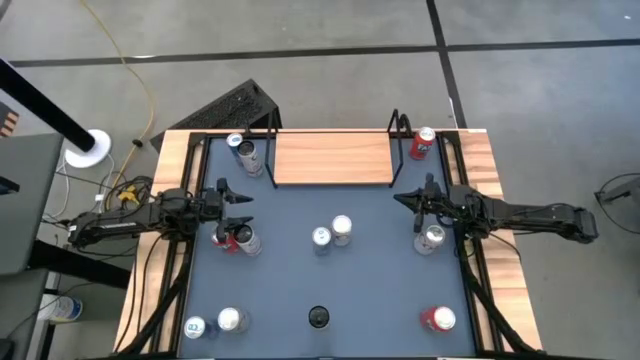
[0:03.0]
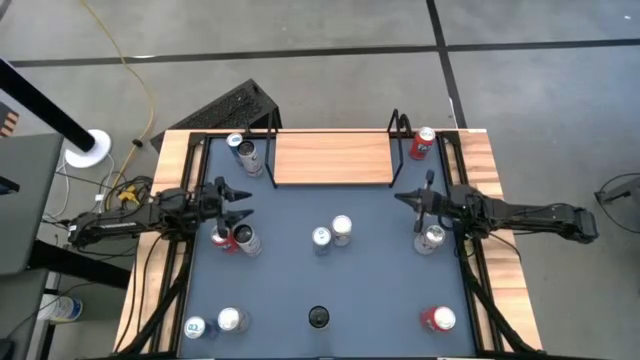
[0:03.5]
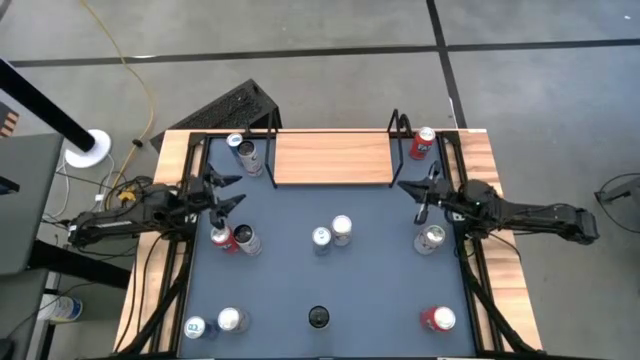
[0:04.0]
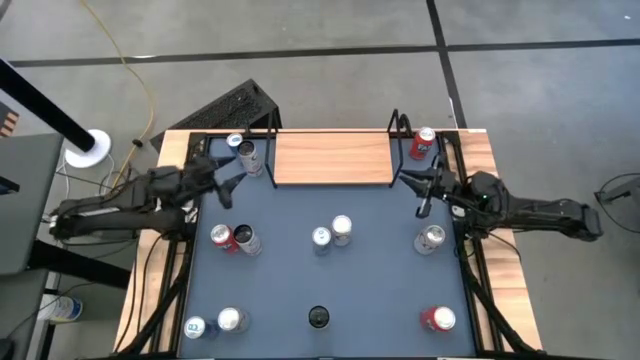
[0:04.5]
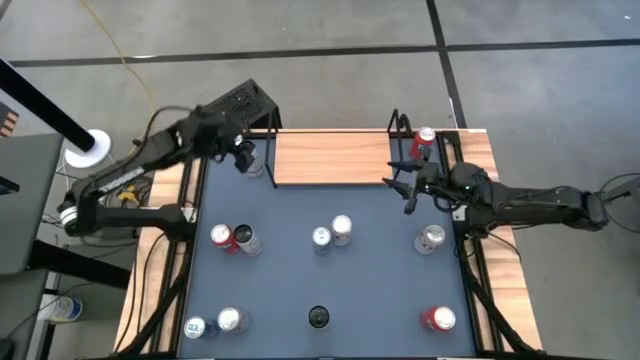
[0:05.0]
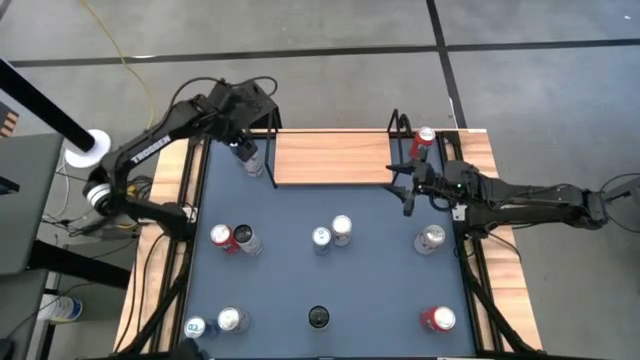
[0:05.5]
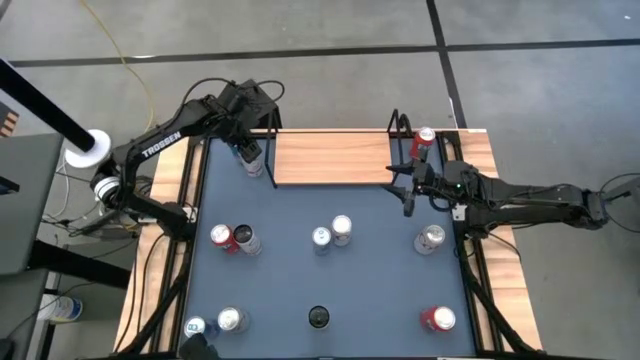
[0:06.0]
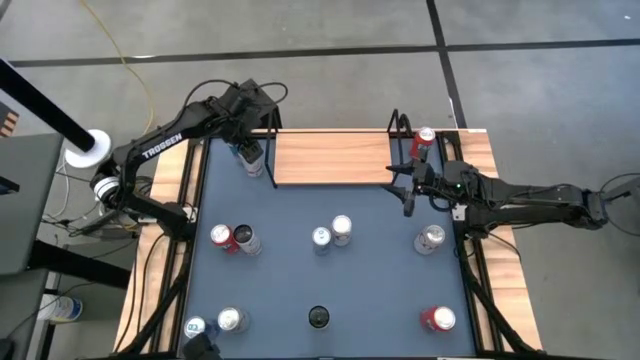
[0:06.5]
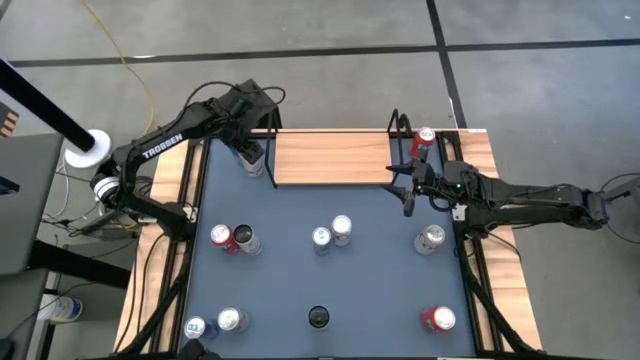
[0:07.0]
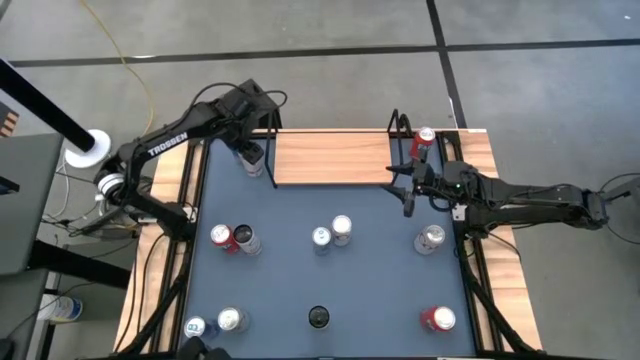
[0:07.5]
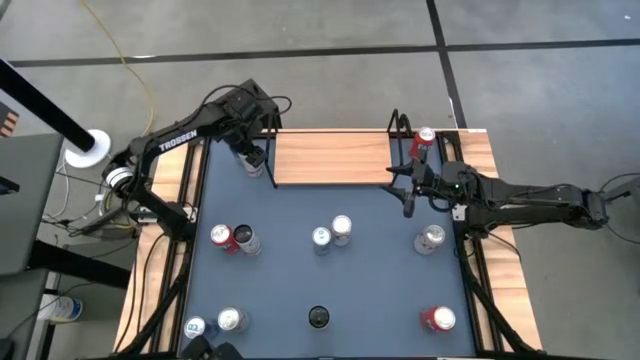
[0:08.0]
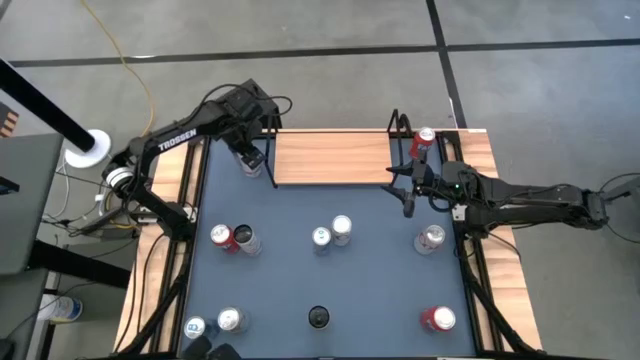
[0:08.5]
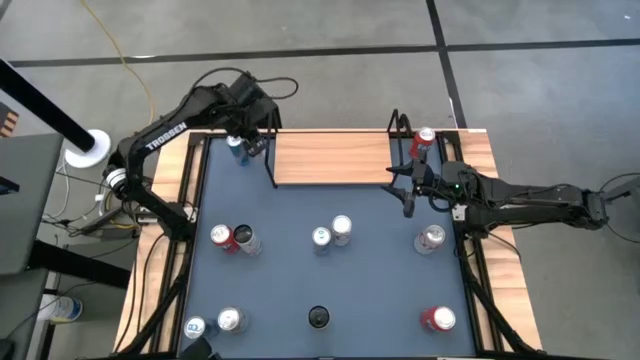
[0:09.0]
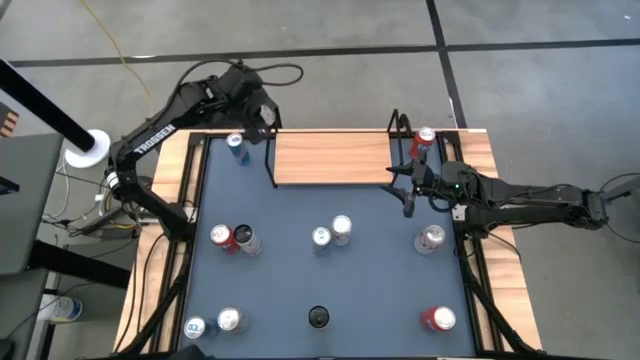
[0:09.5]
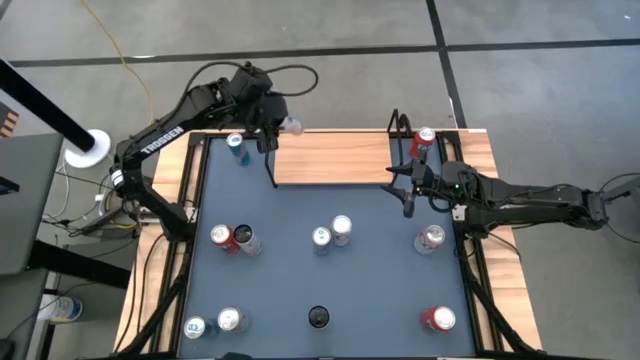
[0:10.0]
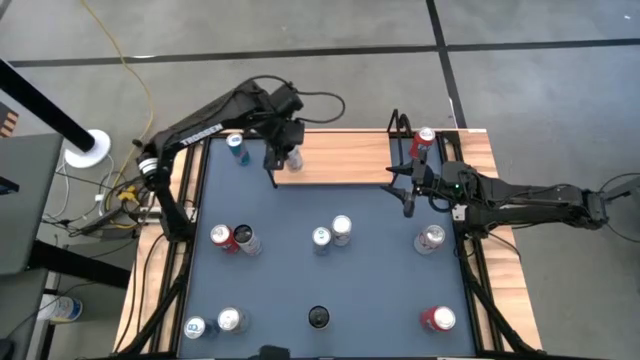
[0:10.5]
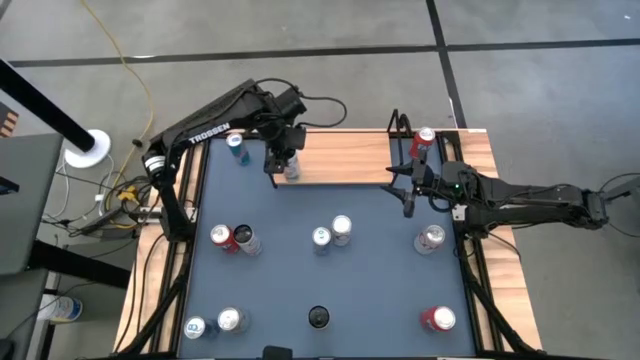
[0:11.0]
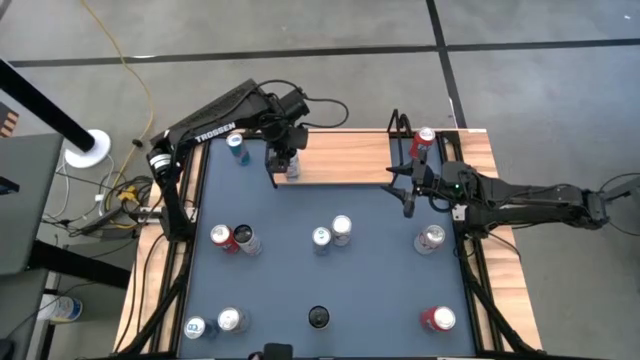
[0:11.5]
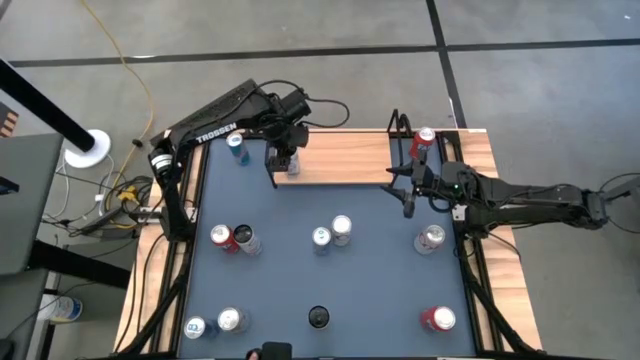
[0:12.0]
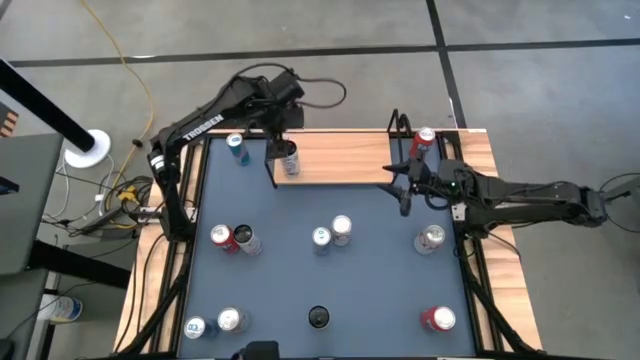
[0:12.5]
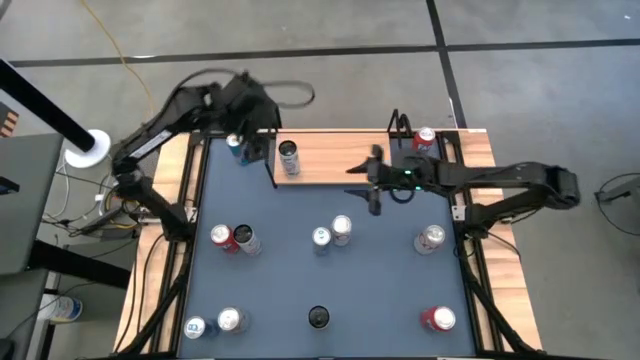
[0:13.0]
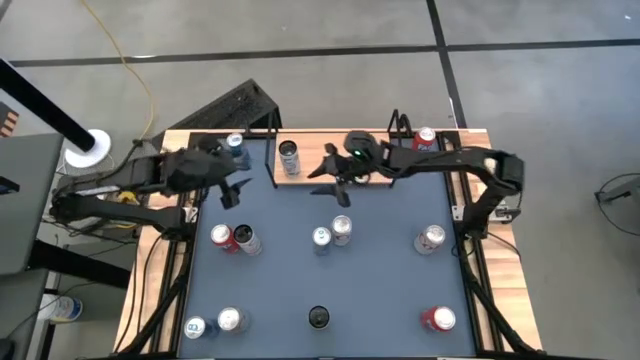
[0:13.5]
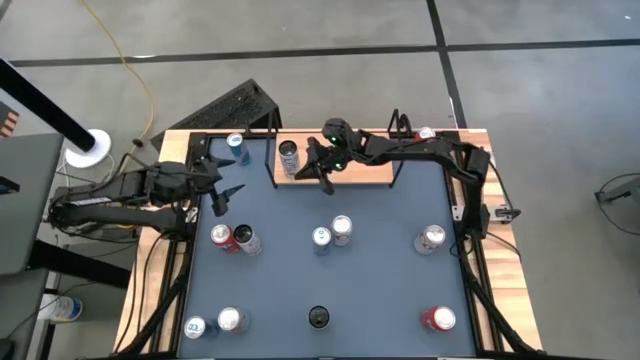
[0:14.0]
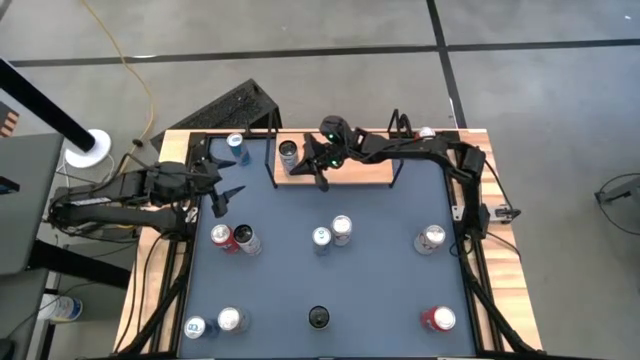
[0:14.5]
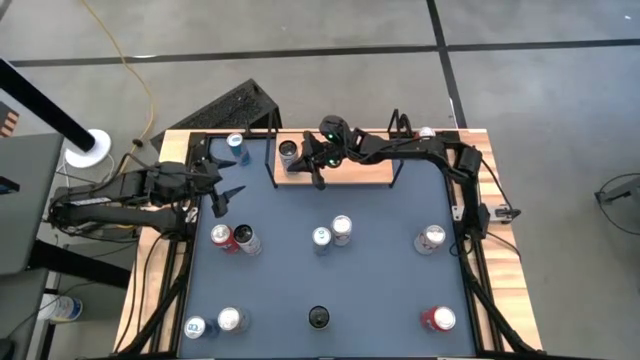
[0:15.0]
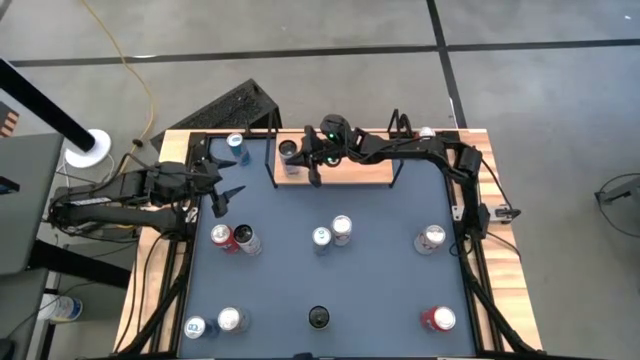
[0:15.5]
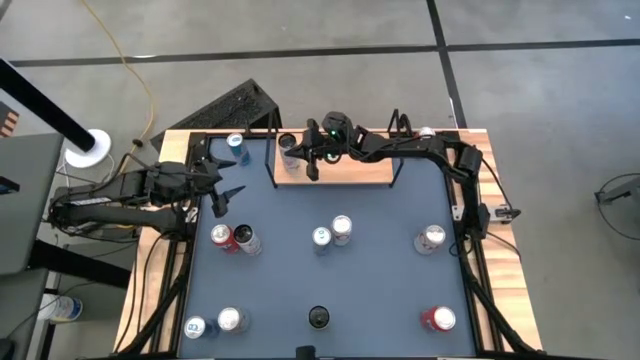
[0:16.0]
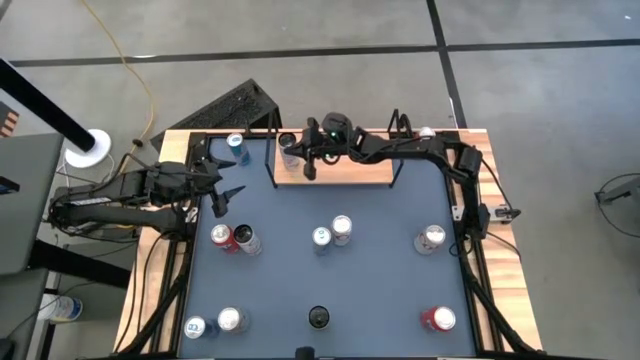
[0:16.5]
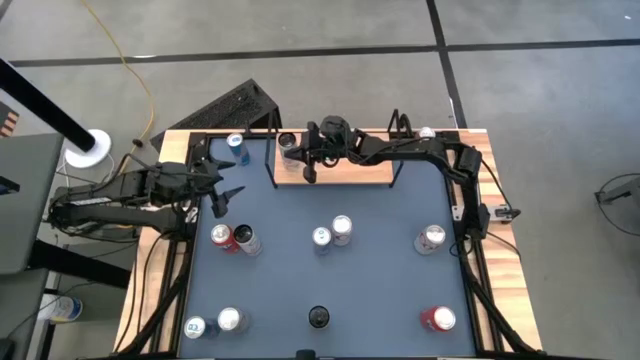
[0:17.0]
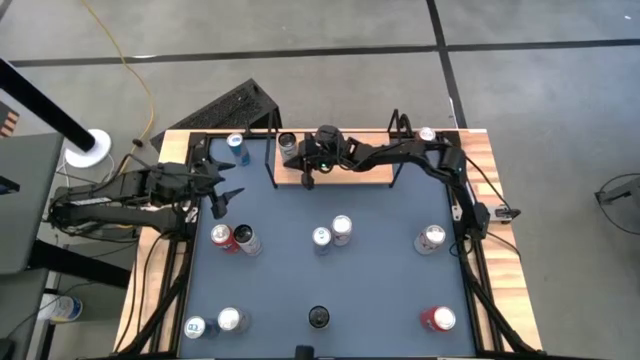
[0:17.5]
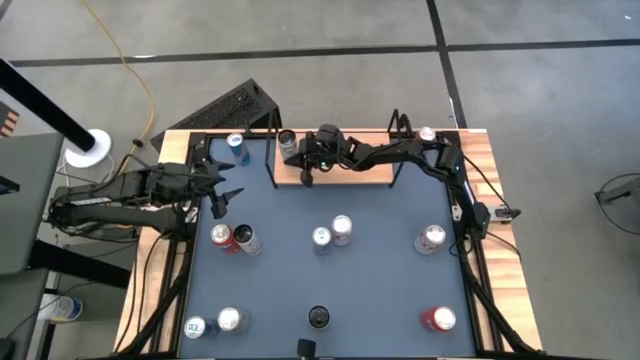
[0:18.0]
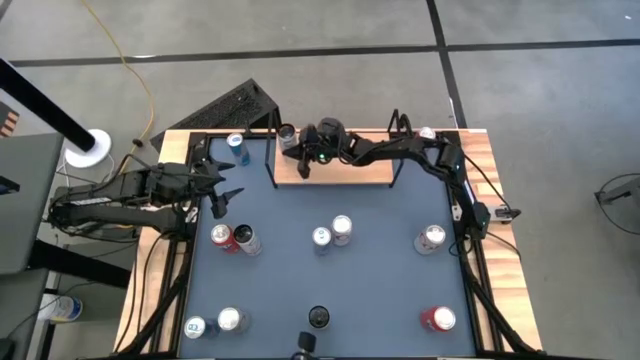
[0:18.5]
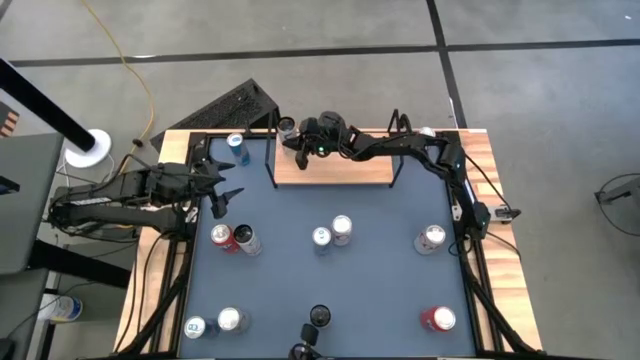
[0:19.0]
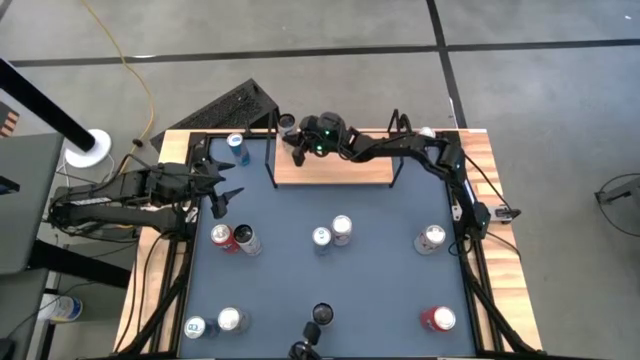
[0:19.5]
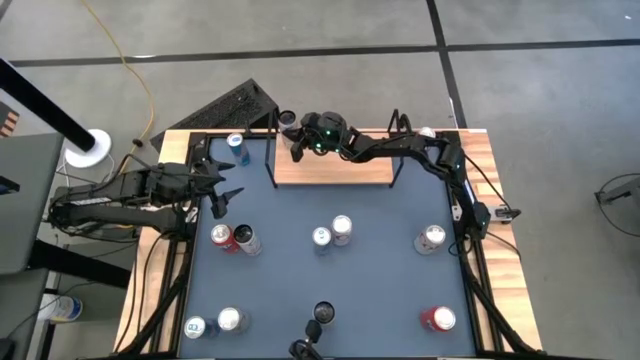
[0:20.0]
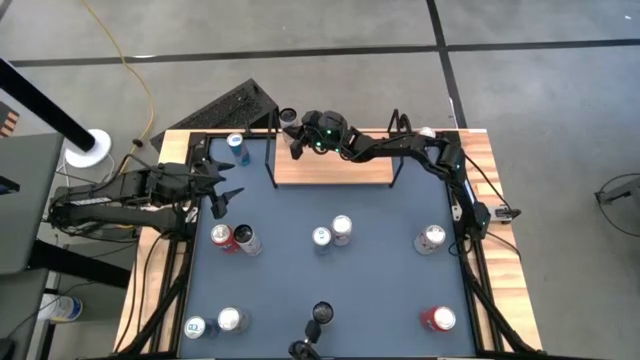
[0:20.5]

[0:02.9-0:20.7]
Task: Place canned beverage on shelf
Put the top white soda can on the shelf

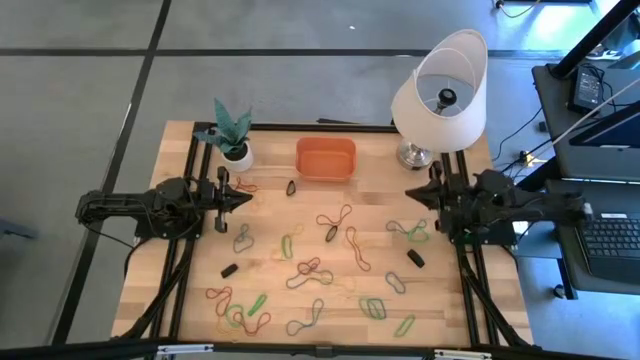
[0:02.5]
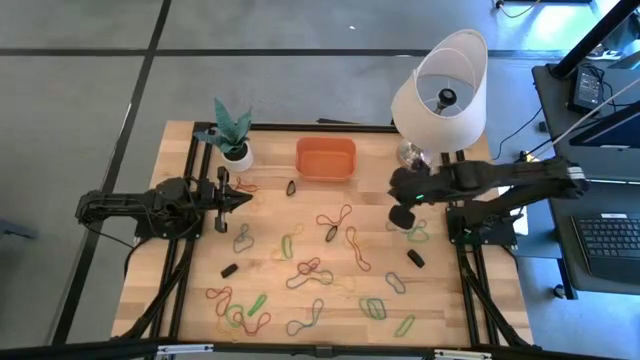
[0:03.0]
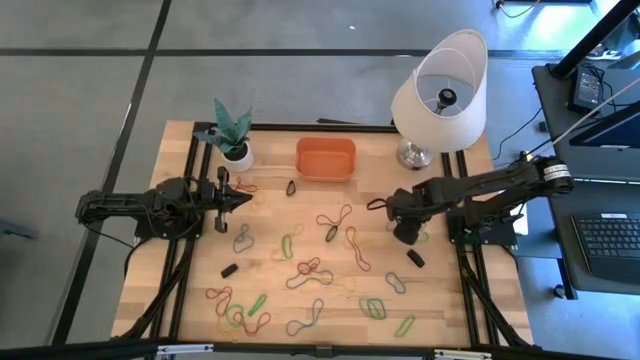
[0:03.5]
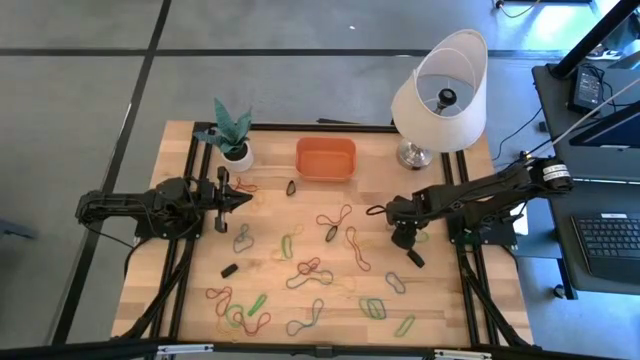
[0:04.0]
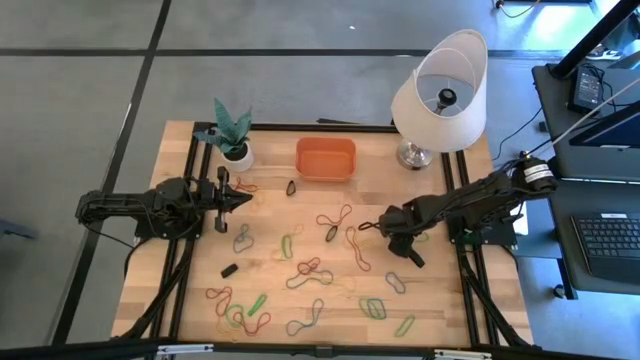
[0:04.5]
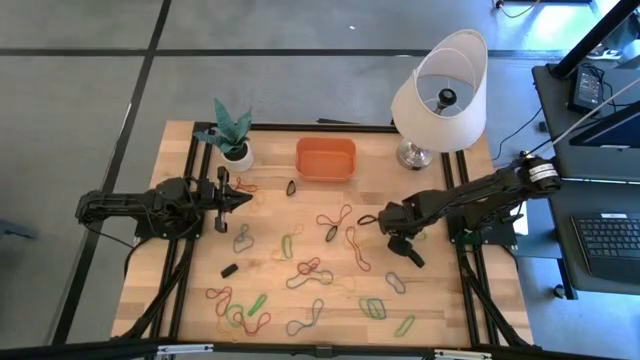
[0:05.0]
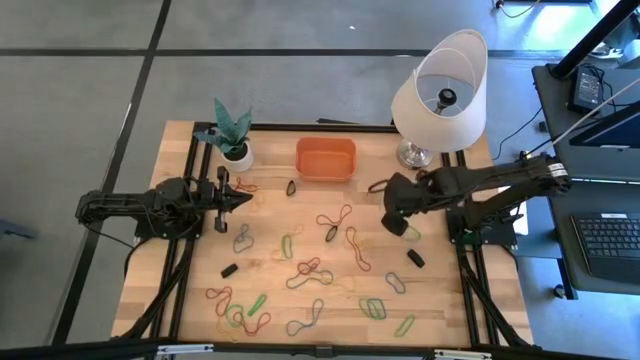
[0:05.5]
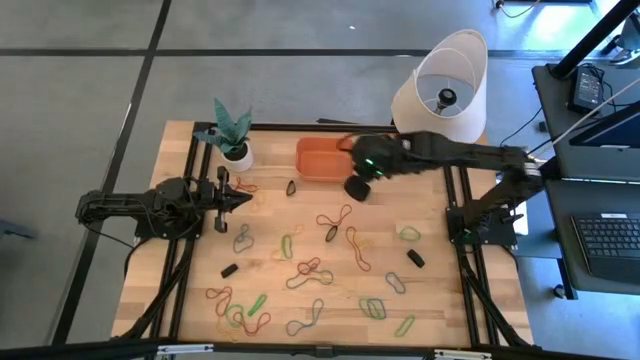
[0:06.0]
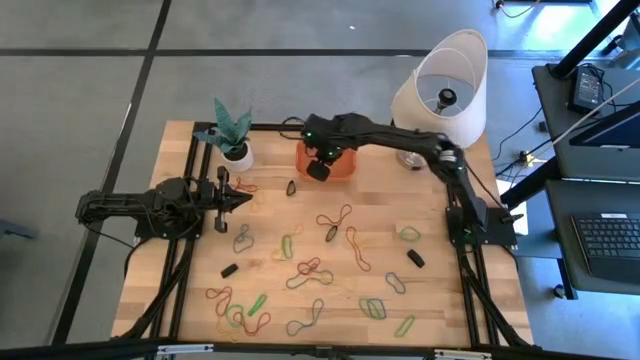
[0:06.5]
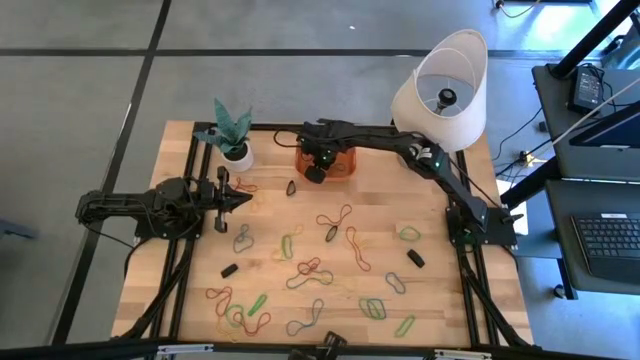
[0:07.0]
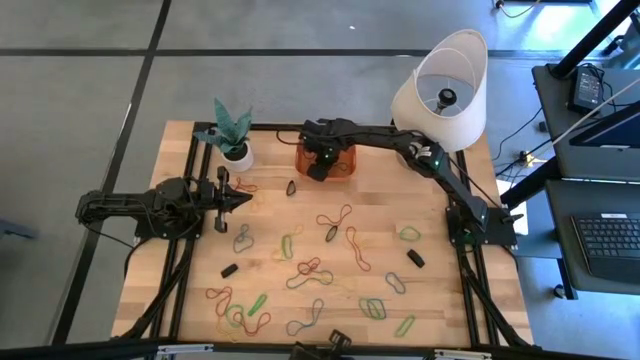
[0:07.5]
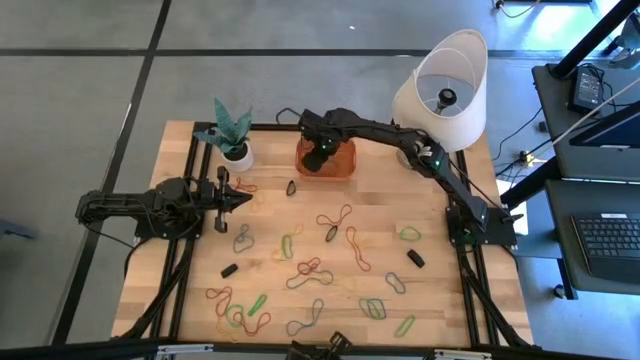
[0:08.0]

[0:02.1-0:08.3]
Task: Pick and place rubber bands into bin
Put the blue rubber band into the bin
